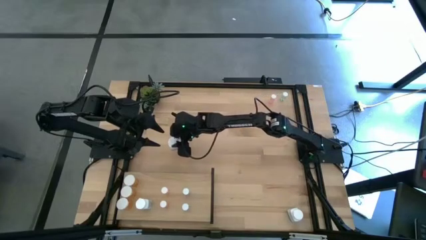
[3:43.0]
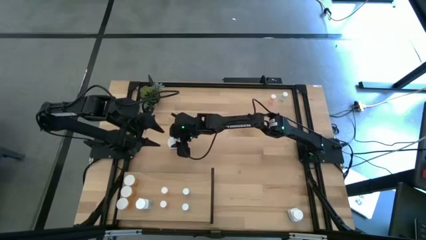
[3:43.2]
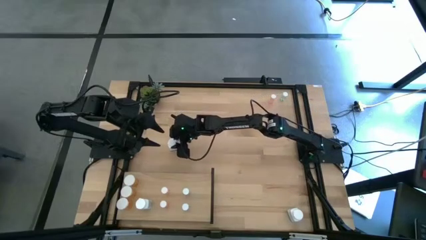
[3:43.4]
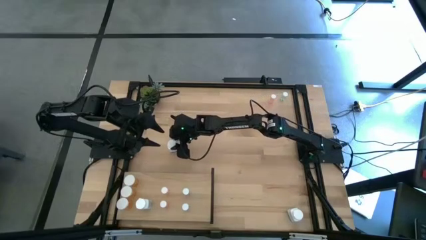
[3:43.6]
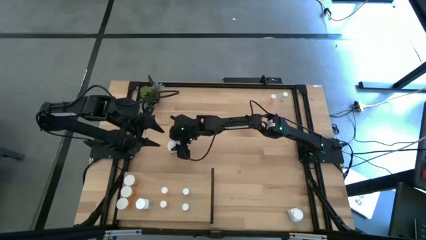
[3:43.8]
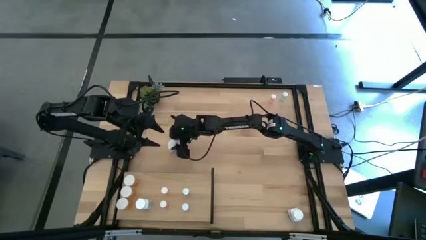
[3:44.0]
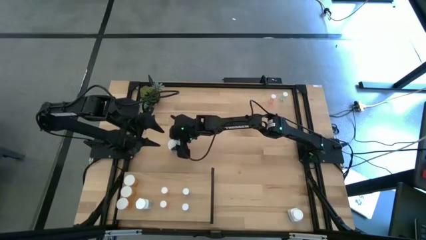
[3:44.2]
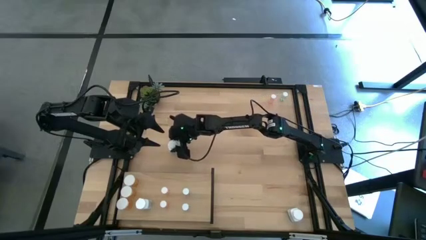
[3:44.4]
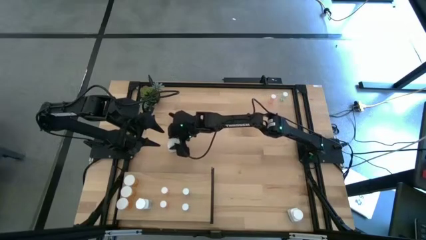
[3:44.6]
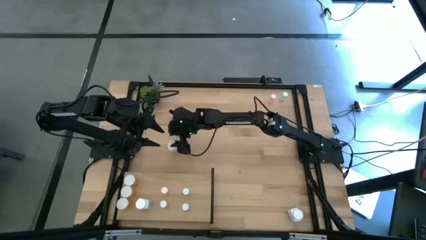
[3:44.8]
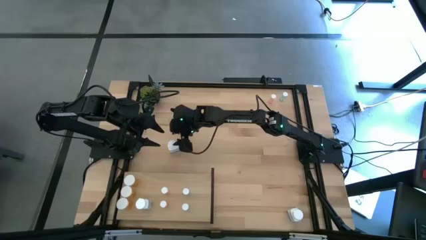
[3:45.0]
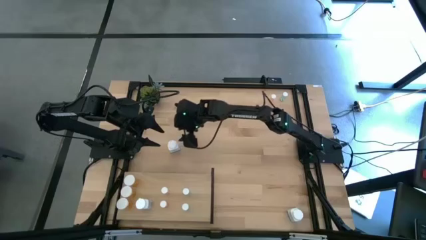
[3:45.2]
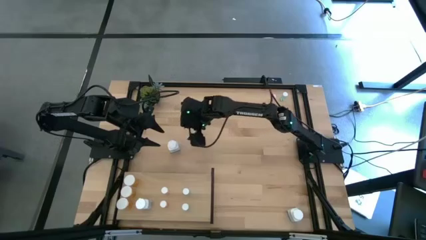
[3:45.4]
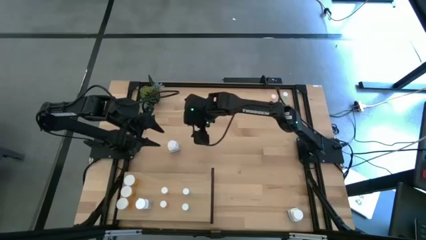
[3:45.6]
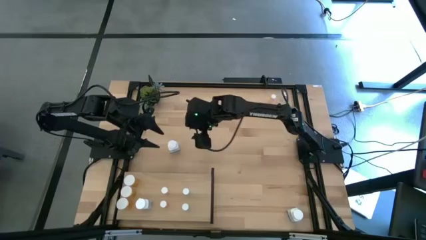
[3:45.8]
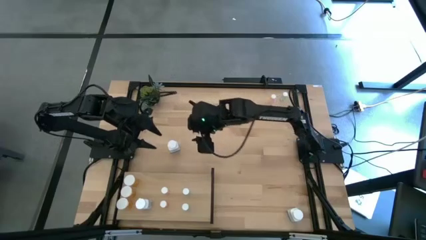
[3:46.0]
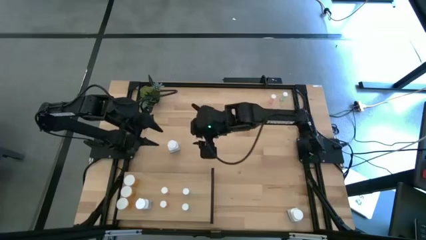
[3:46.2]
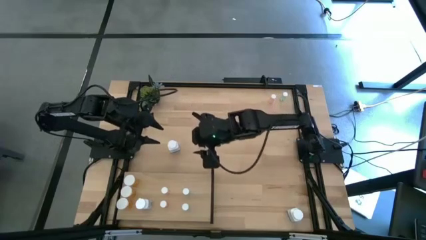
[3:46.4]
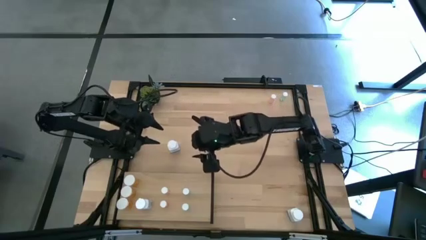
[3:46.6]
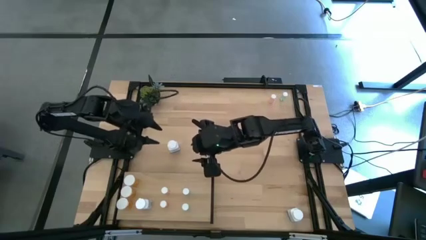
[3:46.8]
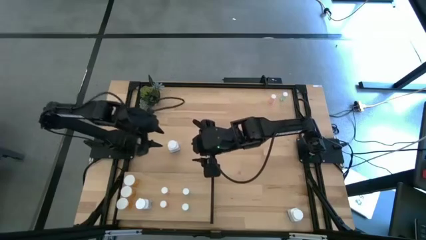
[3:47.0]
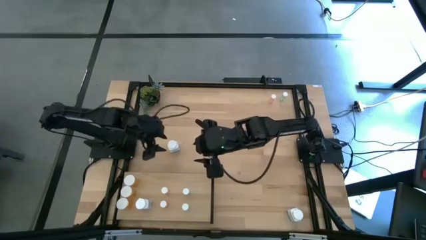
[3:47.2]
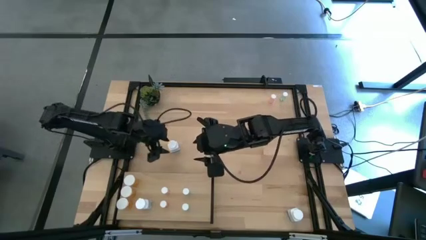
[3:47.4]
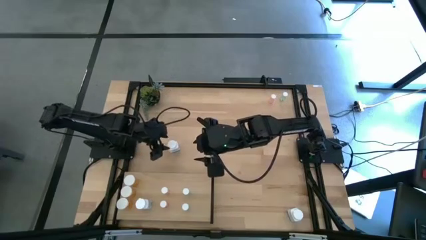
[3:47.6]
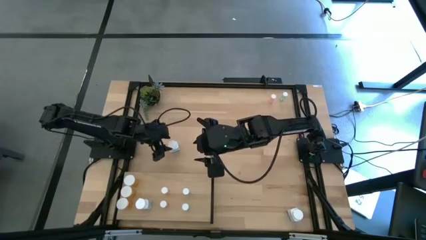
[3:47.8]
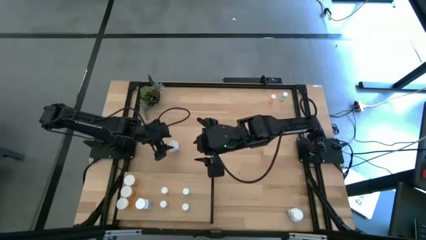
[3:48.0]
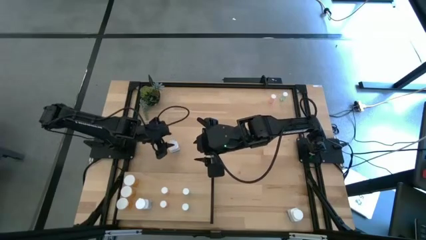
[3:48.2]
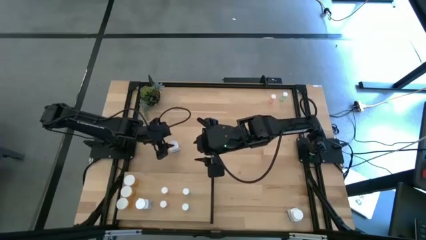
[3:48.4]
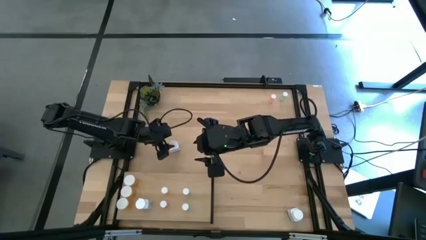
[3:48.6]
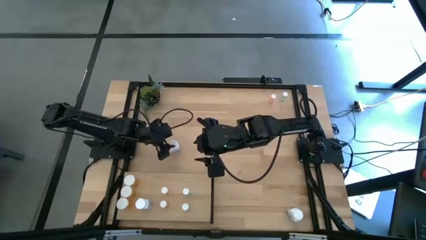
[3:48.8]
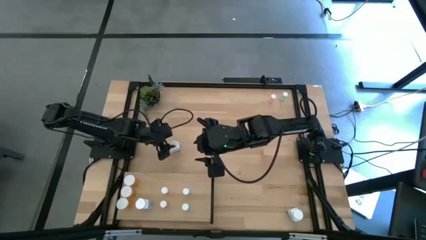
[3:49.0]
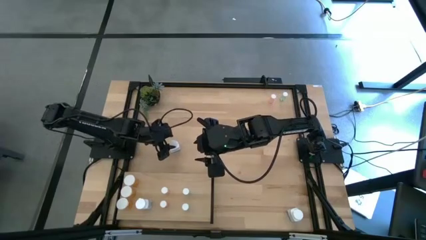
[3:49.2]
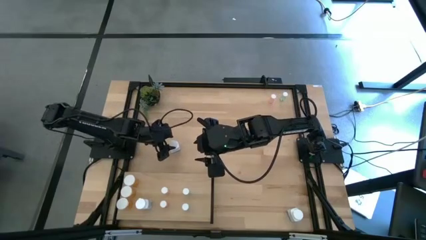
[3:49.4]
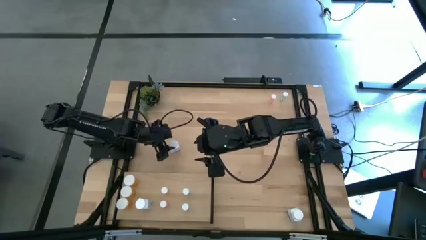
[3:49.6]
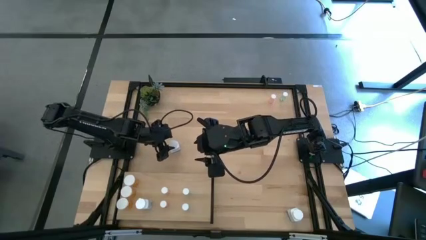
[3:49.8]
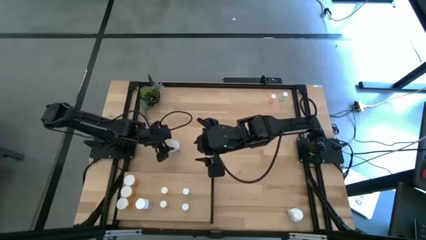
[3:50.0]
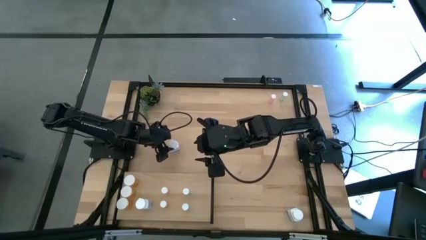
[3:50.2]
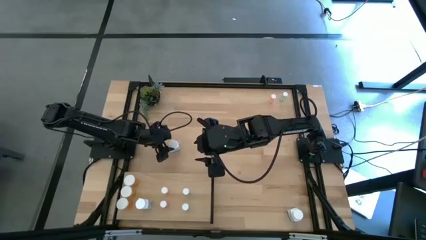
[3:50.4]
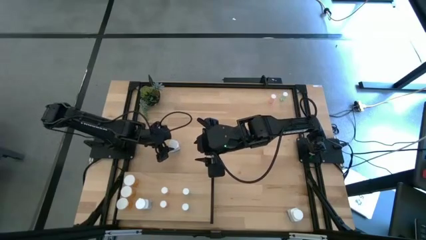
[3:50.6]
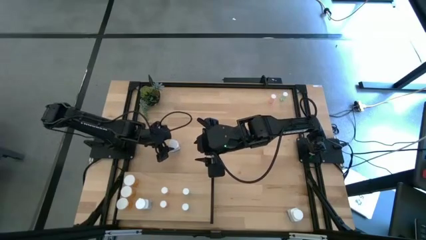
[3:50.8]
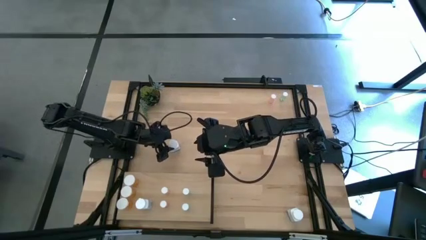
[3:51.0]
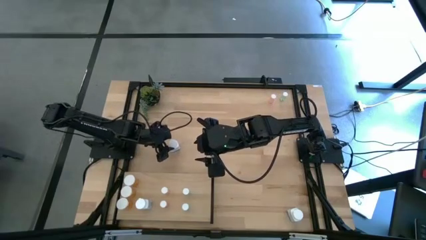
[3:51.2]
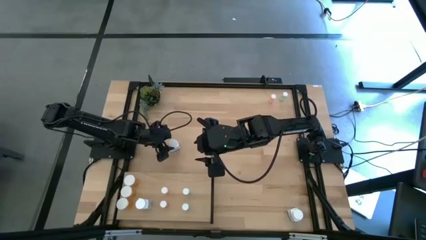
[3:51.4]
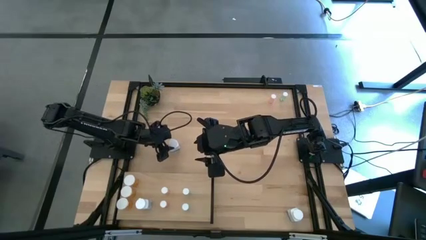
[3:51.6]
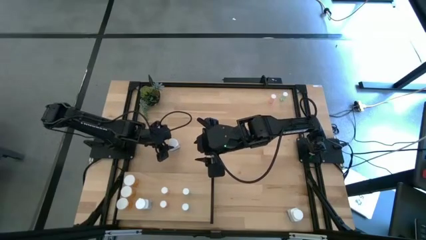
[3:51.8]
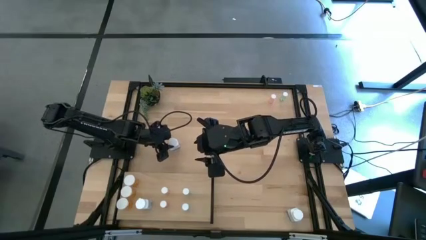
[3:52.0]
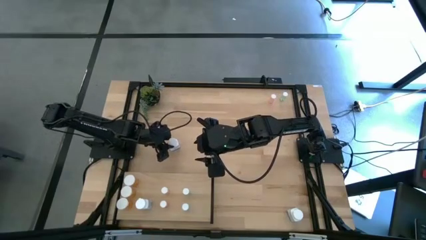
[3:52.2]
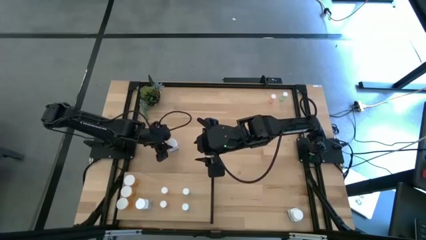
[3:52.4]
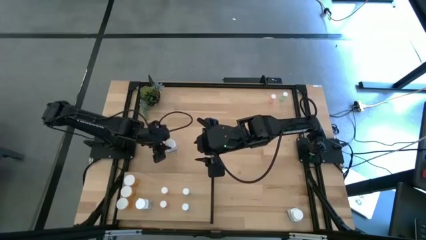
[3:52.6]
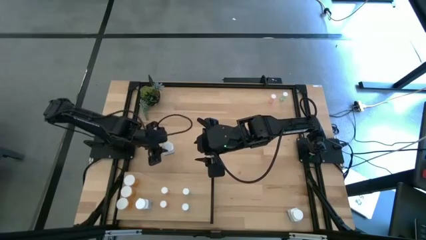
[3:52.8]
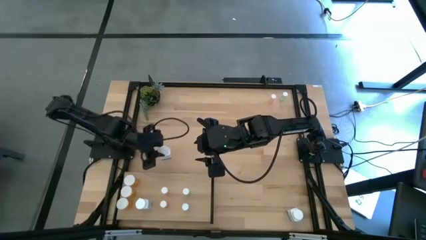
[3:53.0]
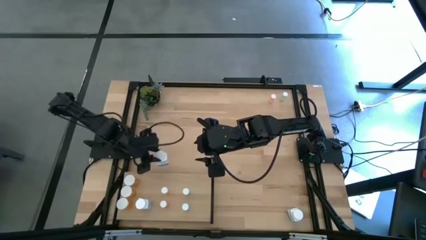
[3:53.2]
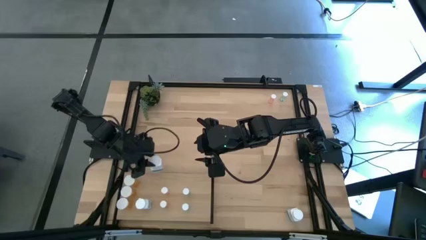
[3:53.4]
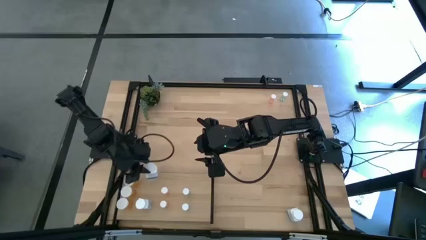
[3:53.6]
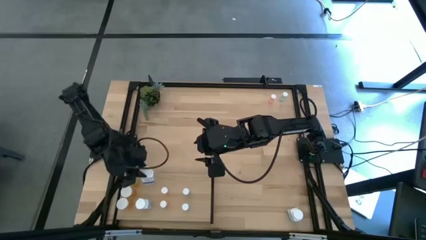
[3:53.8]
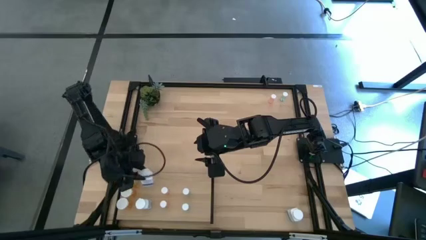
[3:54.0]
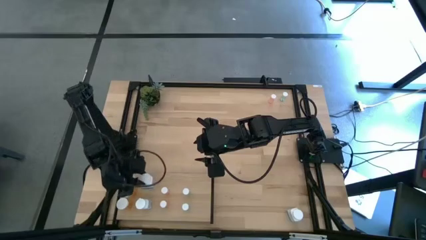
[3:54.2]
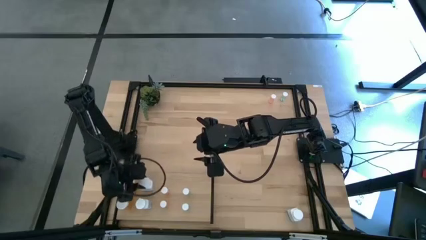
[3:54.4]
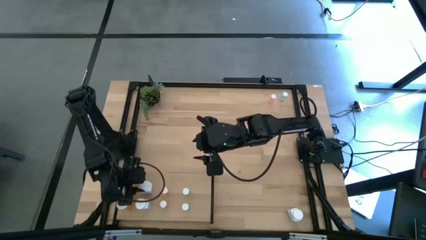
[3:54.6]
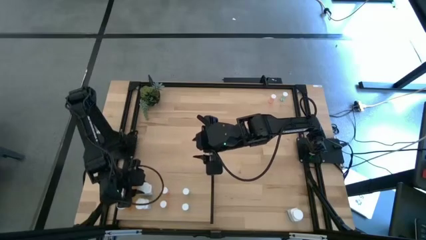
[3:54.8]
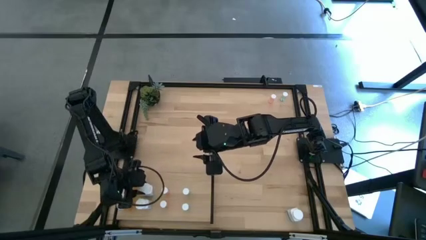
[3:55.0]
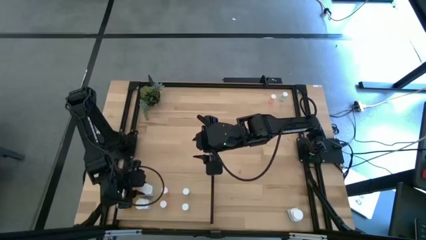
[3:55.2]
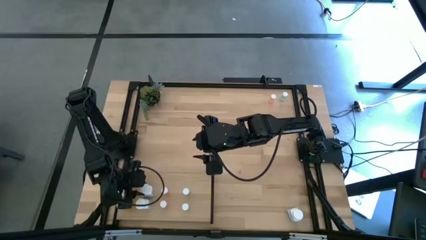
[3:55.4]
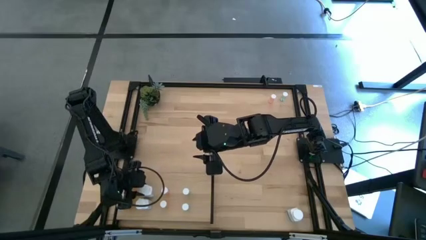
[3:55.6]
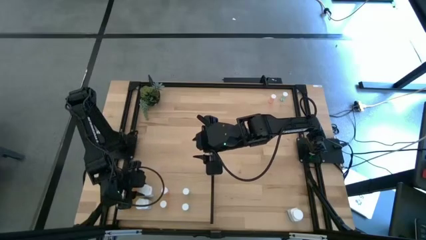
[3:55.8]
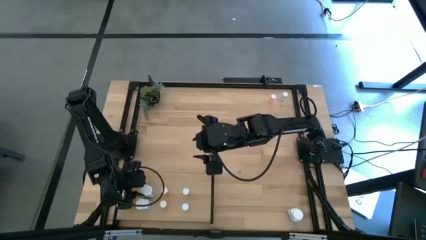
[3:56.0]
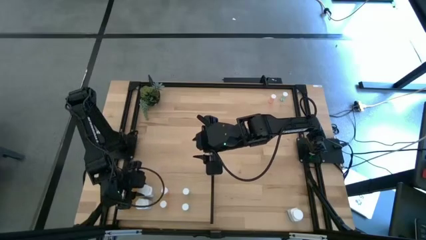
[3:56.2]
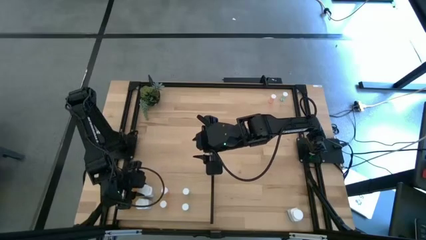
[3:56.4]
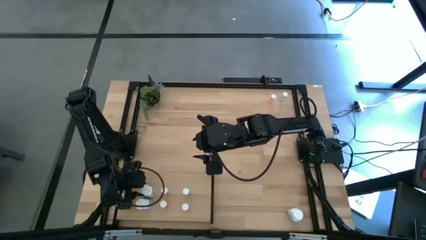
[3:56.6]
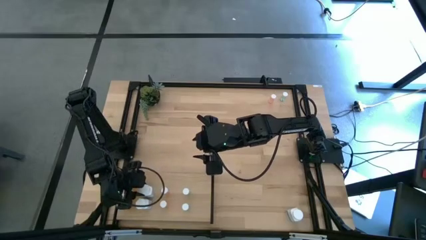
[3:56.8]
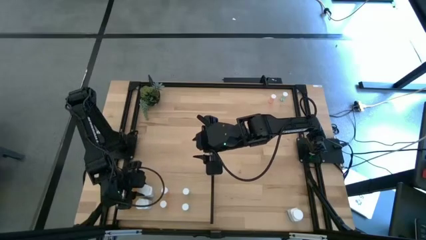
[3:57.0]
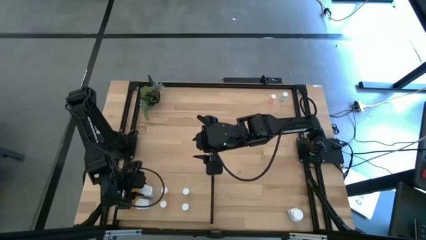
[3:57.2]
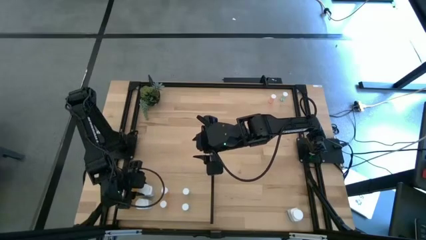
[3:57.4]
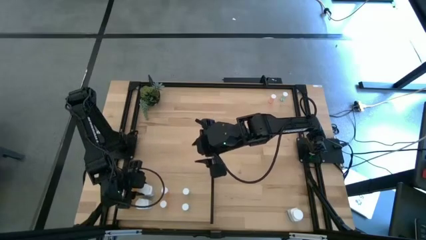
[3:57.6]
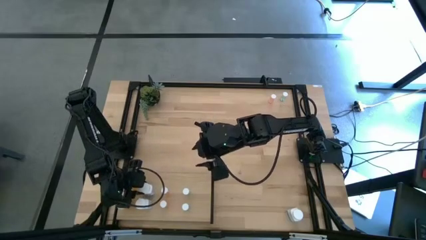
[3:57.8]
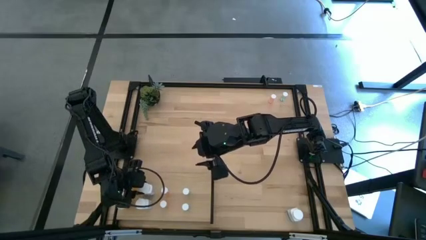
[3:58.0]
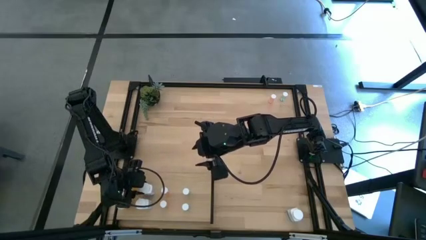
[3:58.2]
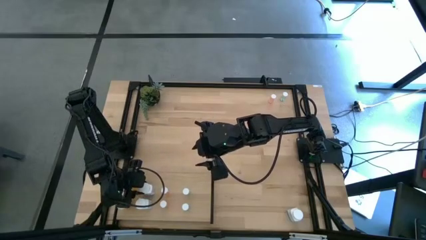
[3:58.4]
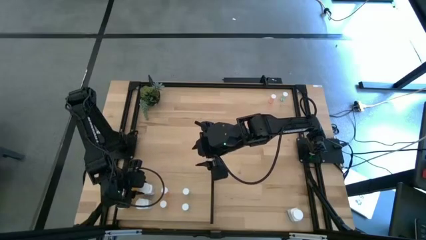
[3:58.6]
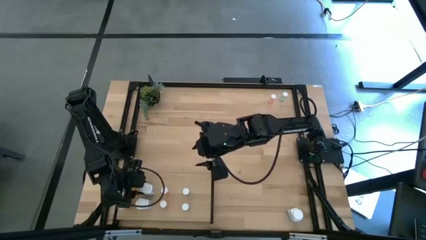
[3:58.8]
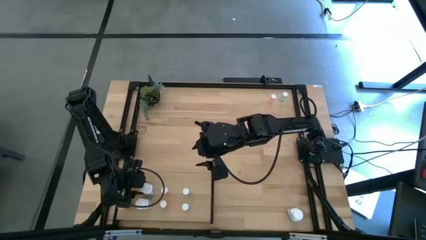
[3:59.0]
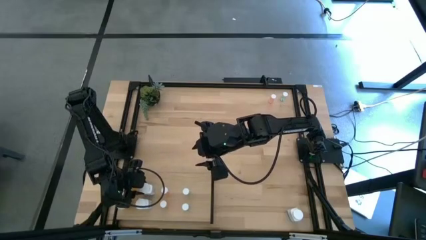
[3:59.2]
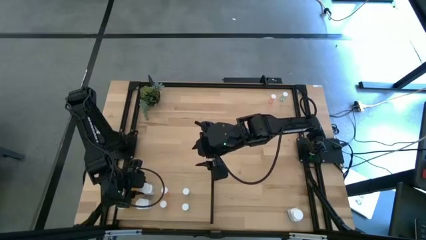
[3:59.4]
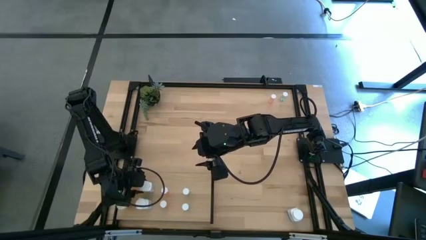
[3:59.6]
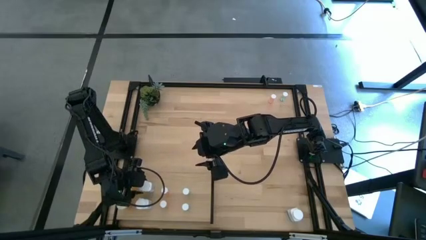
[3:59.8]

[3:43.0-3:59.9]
Task: Pick and place medicine bottles onto shelf by color
Put the left big white pill bottle on the shelf aligned with the other big white pill bottle
